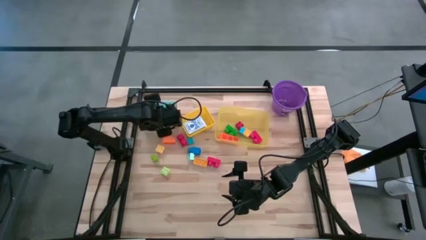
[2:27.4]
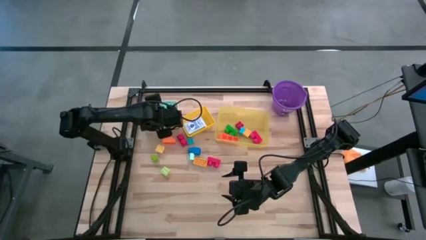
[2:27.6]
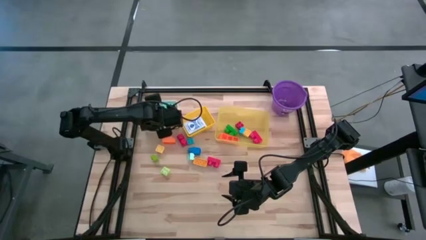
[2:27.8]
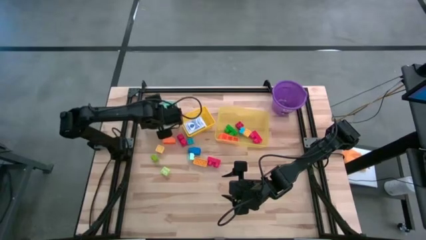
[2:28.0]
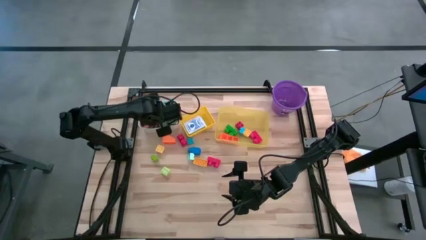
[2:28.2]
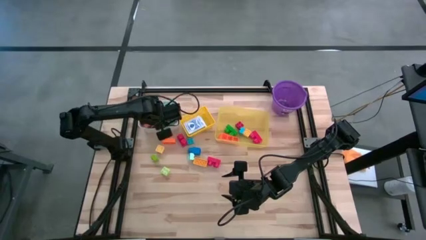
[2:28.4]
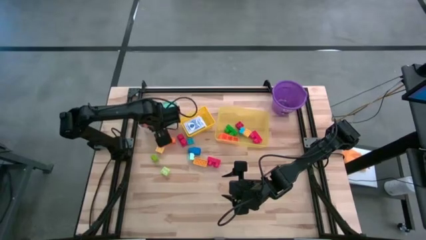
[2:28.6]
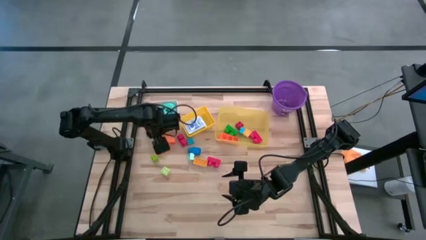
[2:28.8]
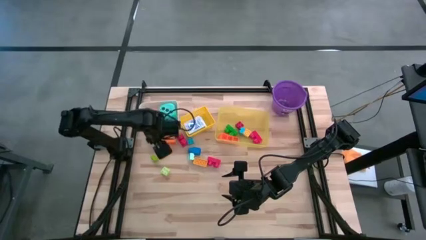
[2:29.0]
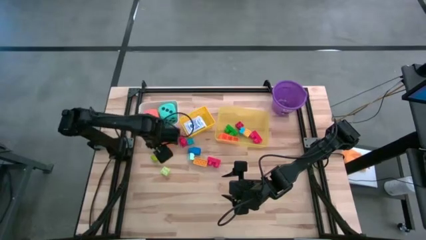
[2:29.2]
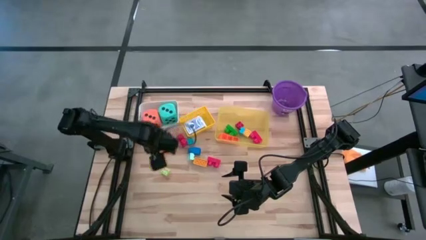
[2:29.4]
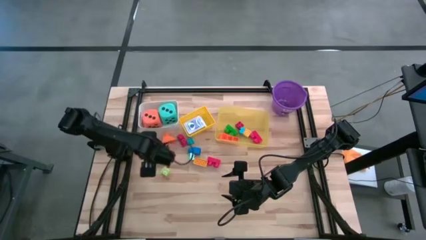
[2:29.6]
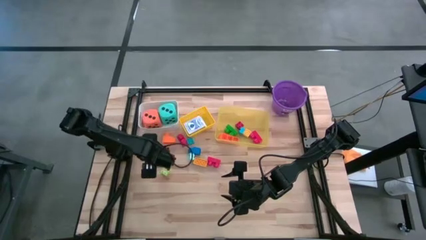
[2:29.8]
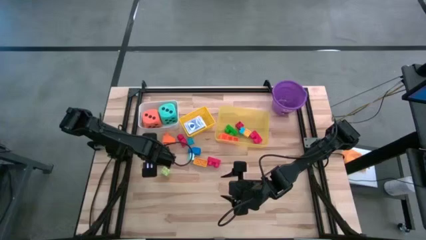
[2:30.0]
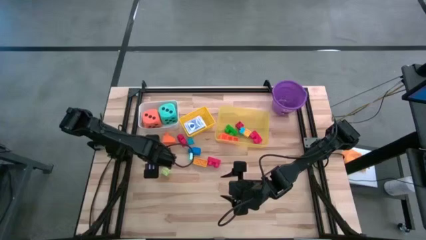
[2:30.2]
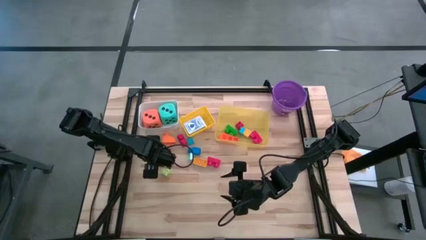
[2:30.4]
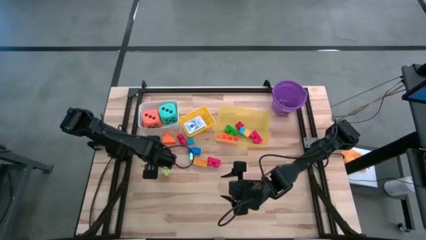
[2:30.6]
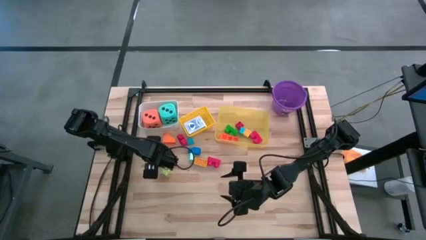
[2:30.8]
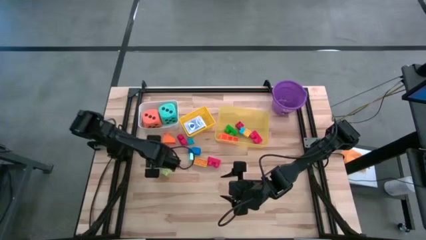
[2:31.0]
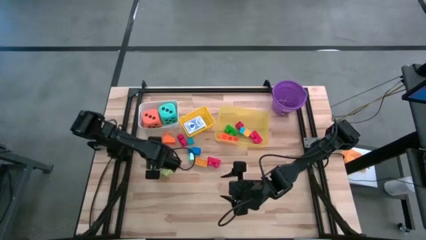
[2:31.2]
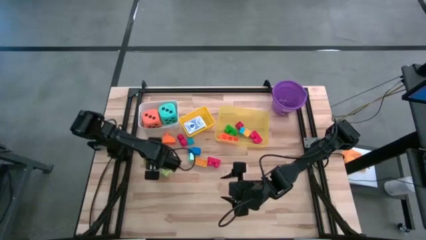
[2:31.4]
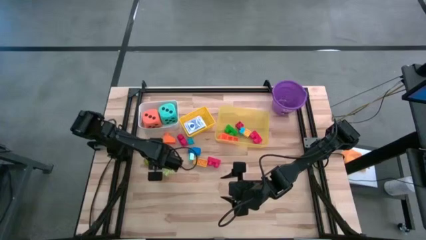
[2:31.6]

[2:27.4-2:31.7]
Task: Pick & Place Toys
Put the green game piece into the yellow bin

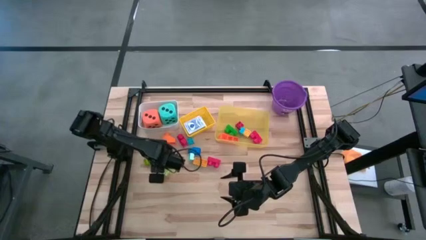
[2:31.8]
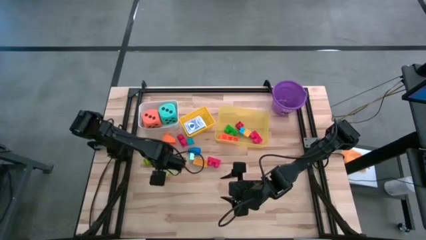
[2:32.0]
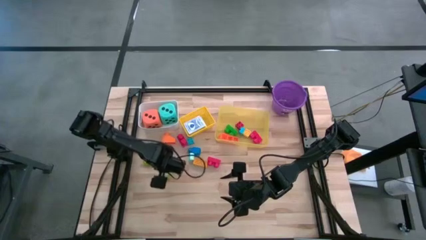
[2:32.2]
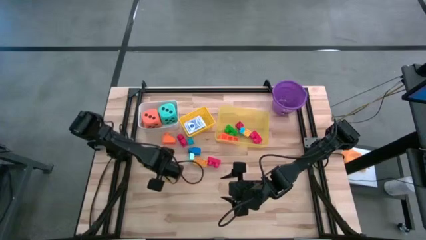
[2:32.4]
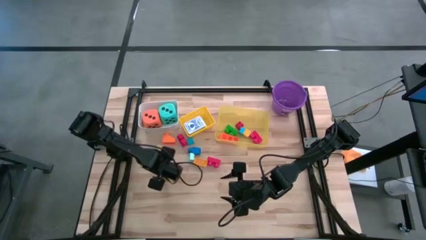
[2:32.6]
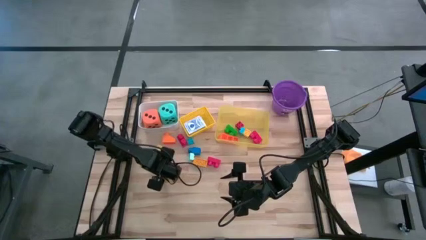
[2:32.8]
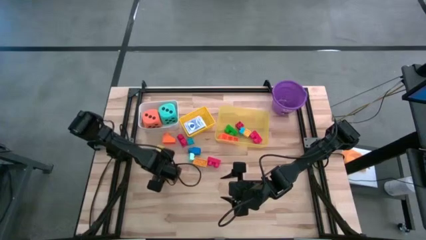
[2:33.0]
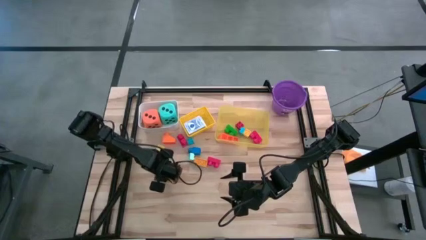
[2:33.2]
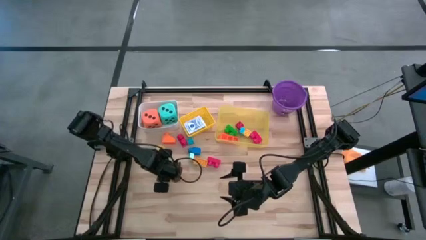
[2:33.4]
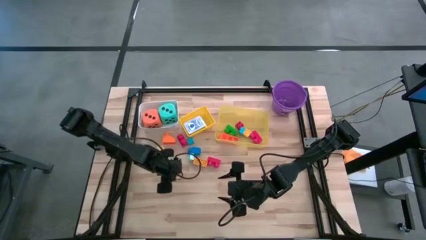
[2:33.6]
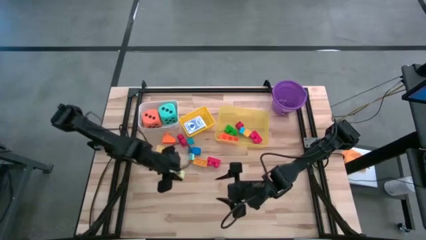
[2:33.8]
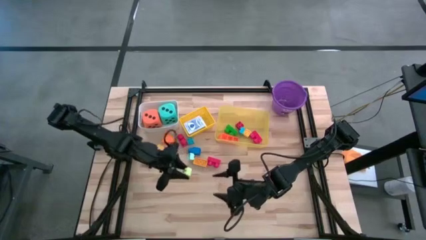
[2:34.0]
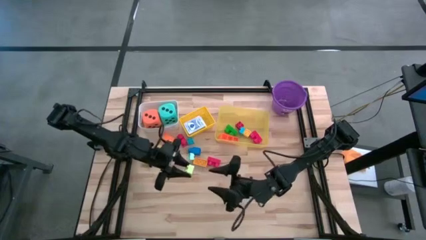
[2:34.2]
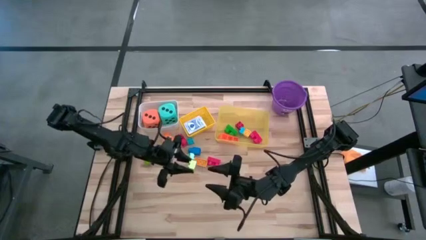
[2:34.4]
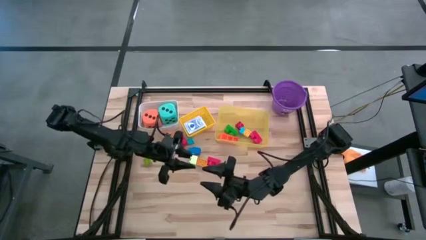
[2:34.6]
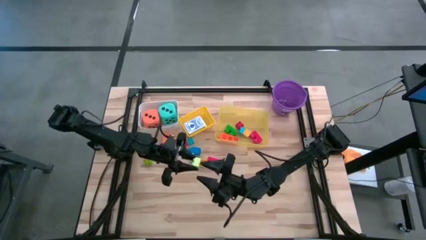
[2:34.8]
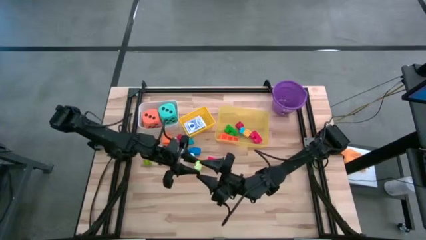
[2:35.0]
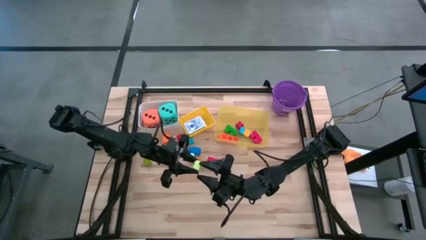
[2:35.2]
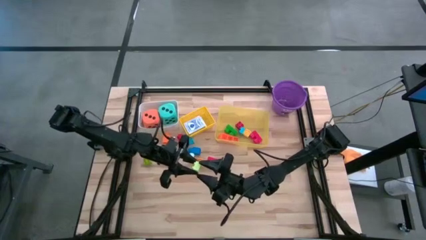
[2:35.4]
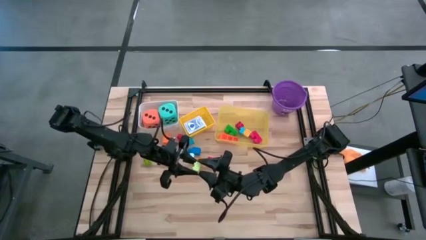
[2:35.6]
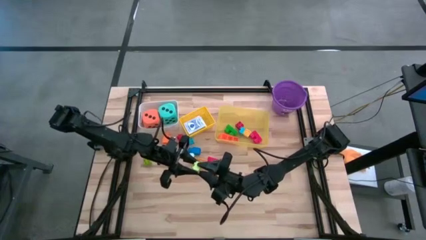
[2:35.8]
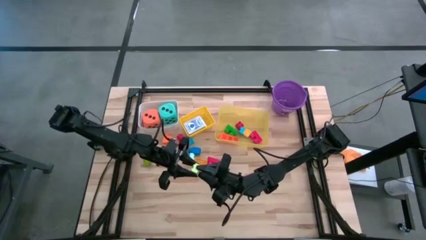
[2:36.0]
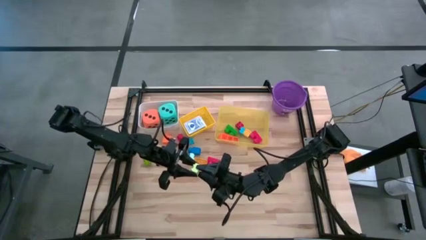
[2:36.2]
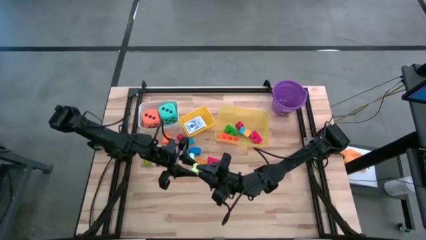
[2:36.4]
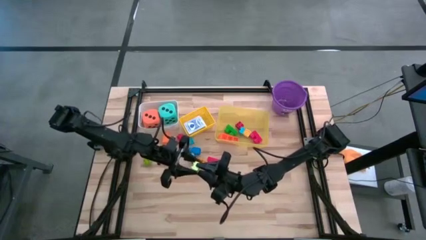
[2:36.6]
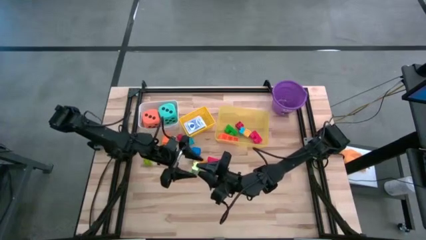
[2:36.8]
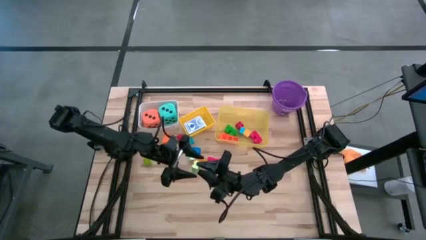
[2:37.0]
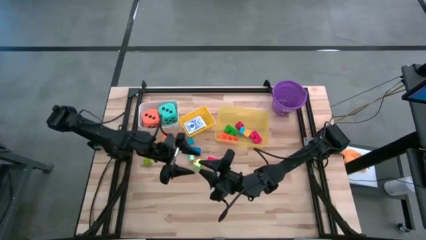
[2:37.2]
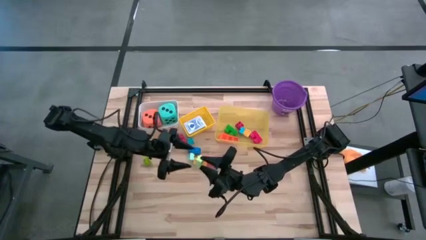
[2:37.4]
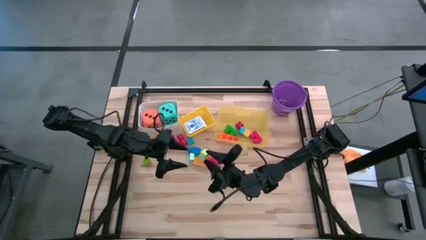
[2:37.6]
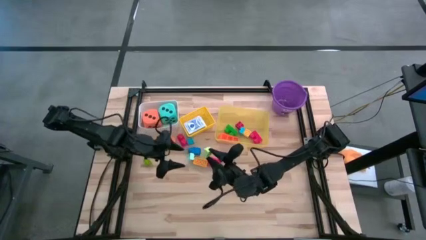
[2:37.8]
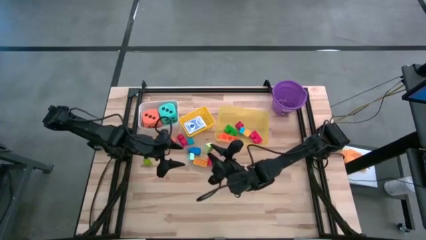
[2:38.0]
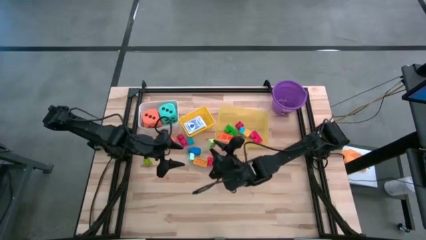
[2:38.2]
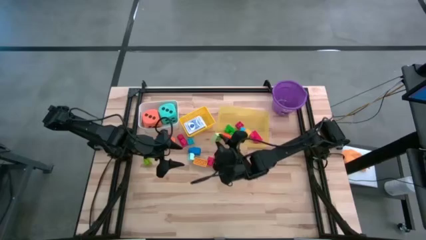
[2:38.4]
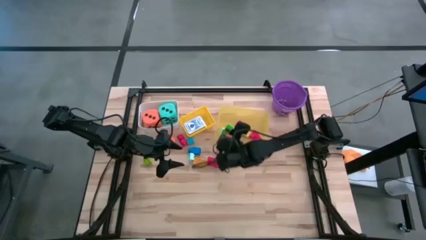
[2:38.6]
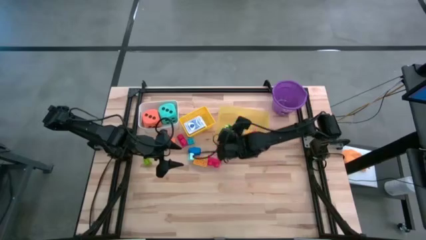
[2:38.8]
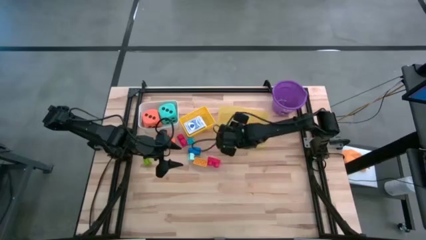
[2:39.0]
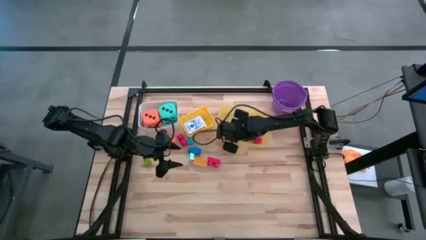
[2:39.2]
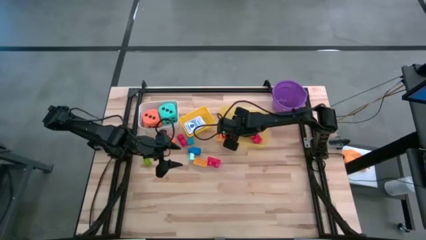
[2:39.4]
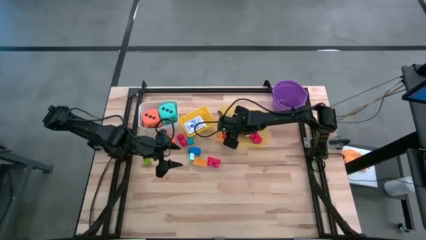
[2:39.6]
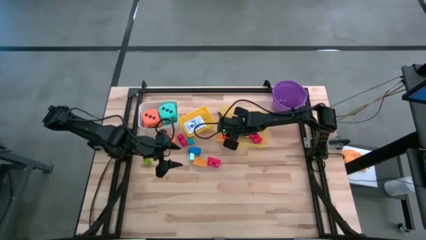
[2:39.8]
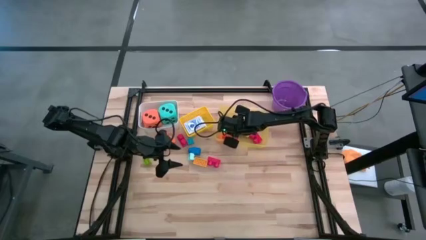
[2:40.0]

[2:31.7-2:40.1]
Put the light green game piece into the yellow bin

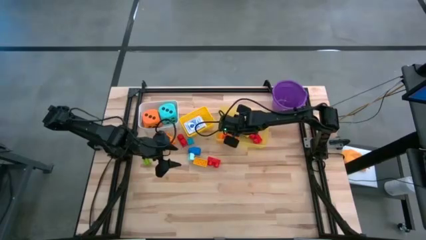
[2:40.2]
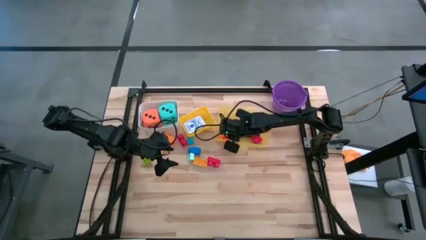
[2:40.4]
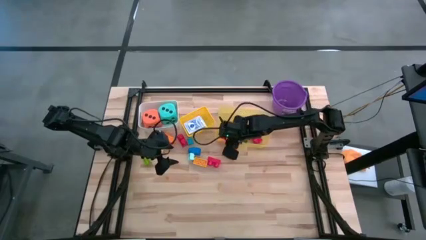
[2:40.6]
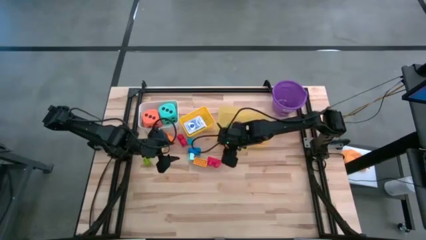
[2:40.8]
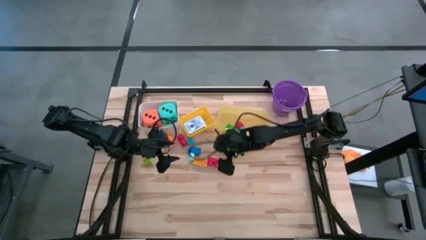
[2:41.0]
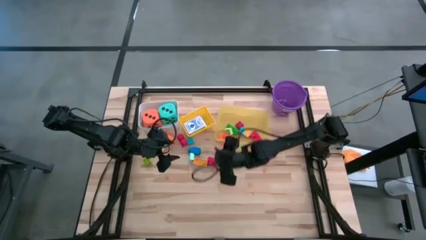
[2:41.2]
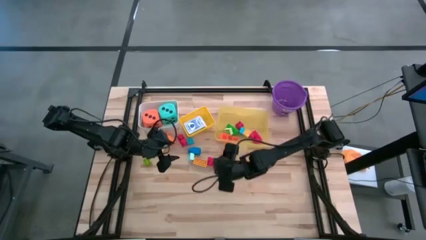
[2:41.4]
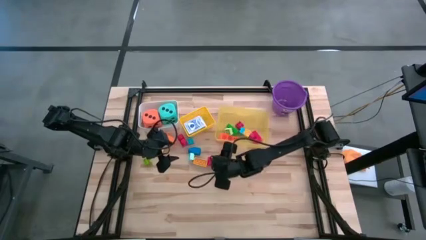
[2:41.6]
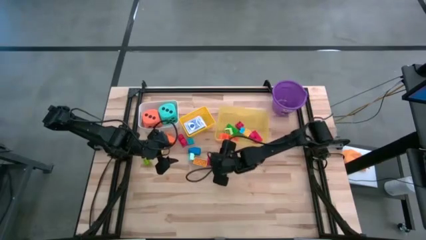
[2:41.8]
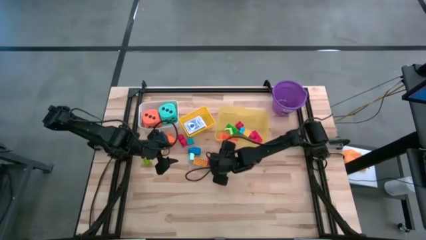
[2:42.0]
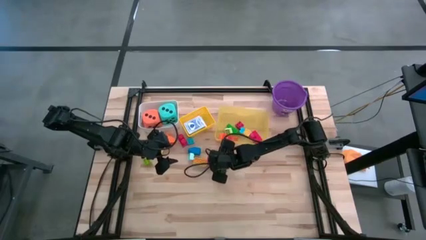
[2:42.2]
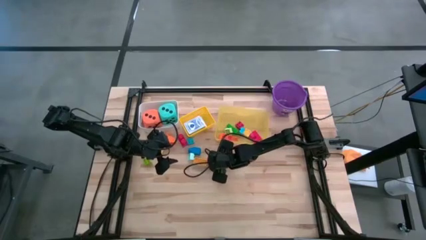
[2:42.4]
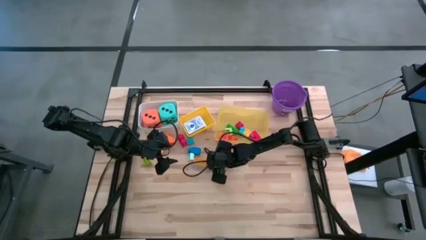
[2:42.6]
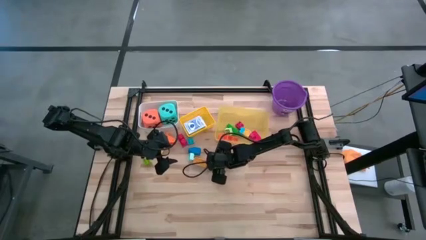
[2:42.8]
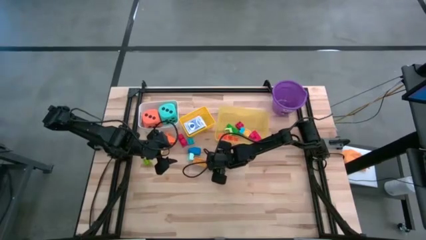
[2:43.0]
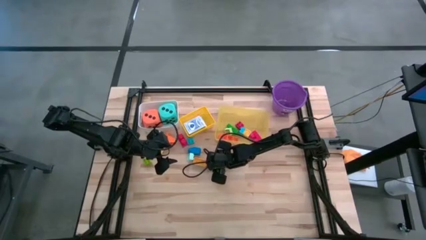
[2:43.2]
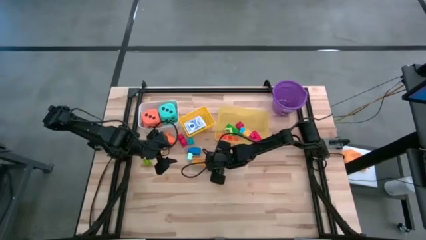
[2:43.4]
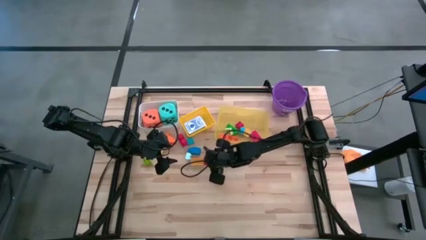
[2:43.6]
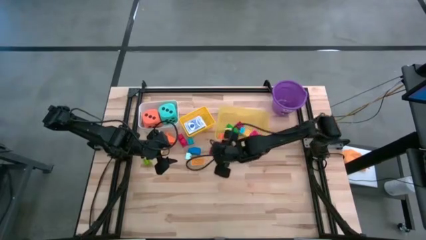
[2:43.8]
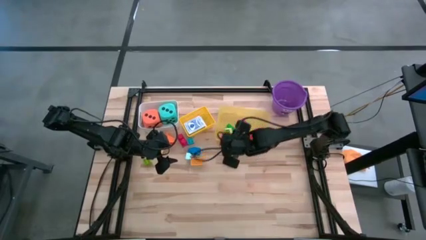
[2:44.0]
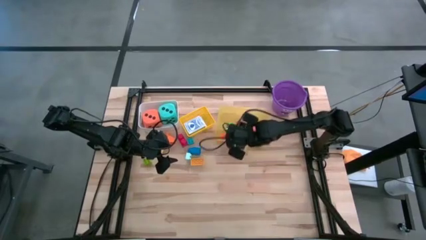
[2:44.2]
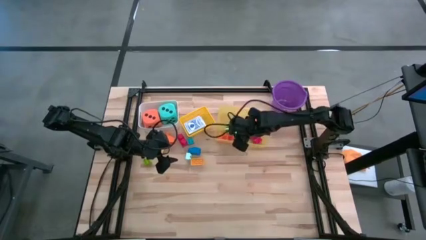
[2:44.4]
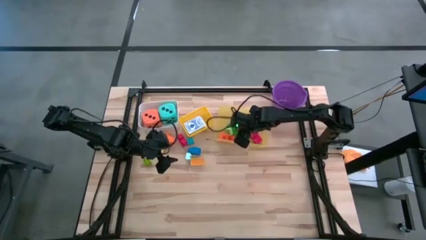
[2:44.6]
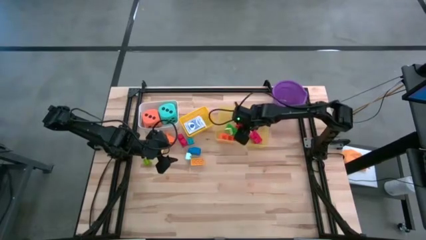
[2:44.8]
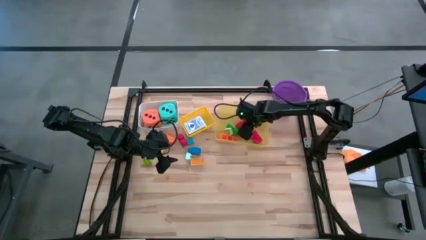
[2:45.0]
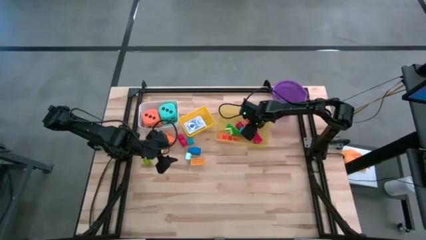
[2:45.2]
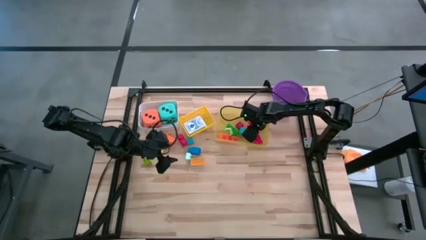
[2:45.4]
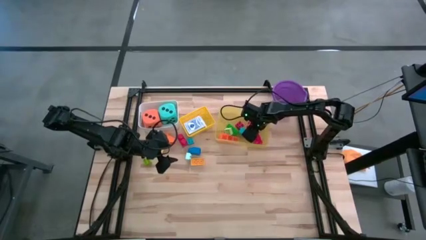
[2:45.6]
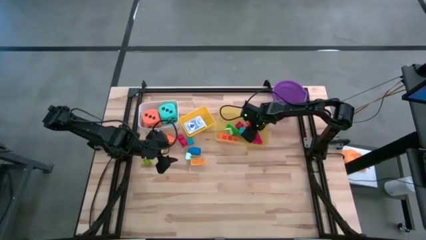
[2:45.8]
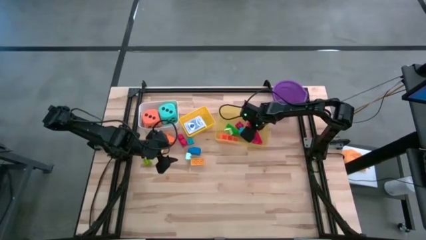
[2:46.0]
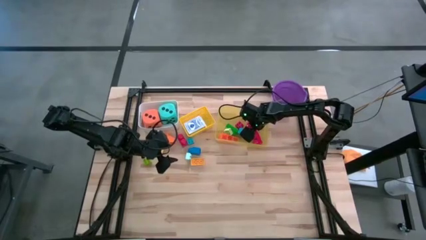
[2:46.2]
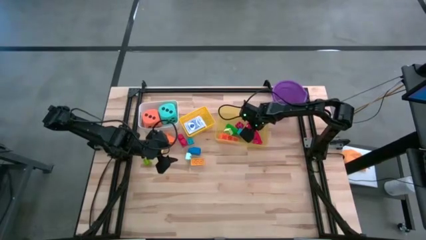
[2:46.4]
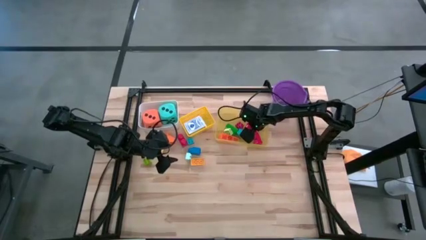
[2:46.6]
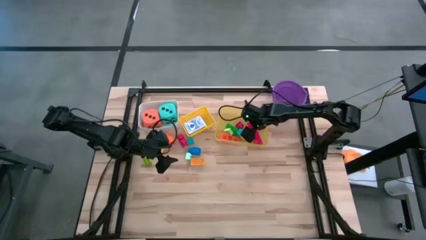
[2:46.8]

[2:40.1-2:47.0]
Put the red game piece into the yellow bin
